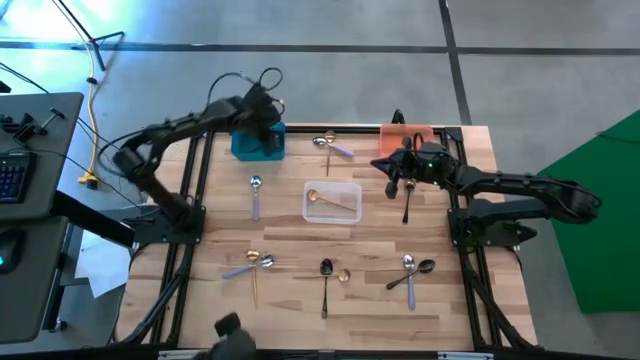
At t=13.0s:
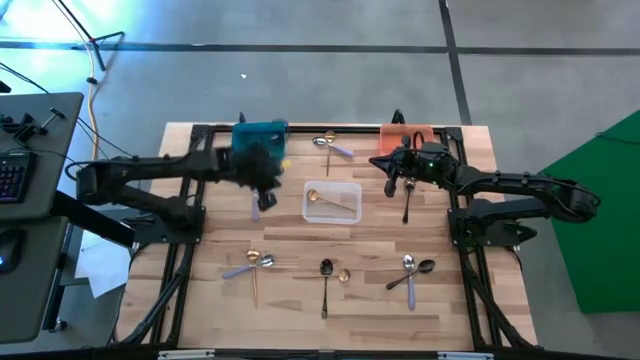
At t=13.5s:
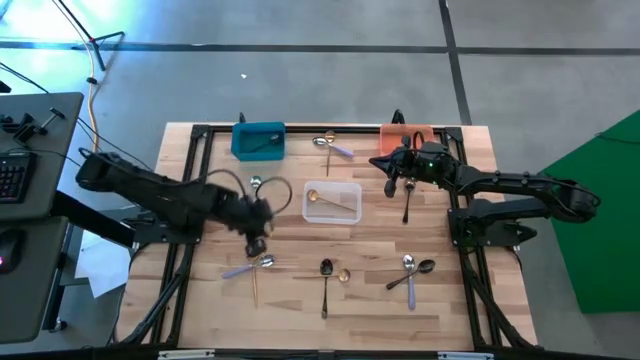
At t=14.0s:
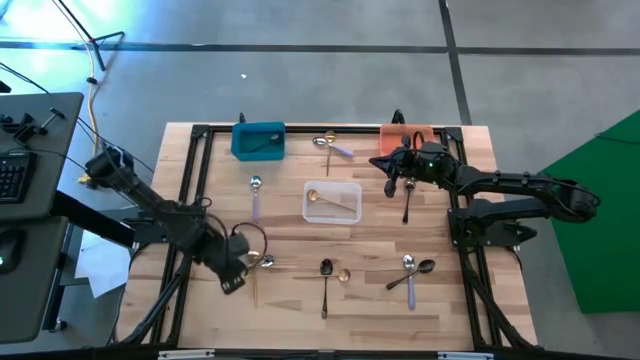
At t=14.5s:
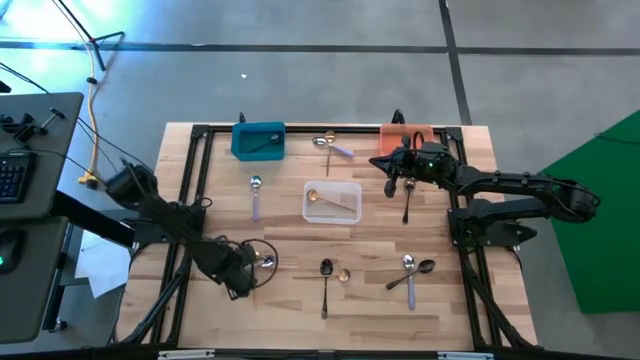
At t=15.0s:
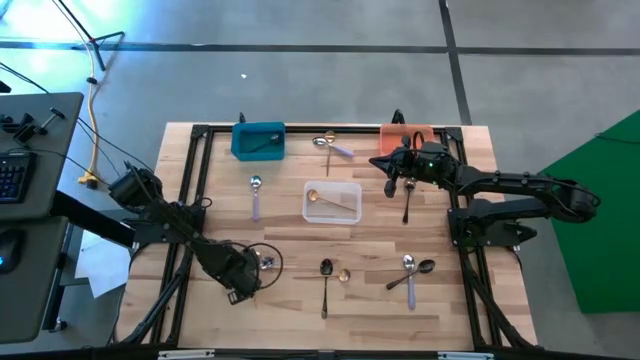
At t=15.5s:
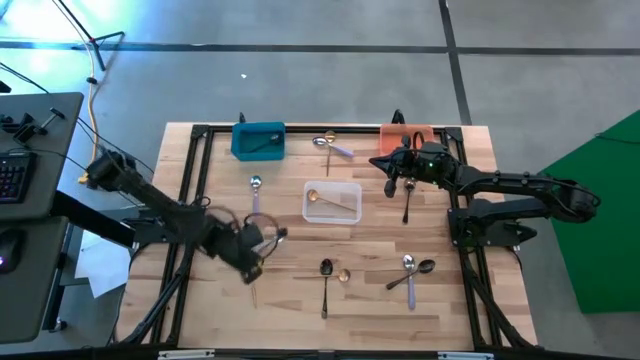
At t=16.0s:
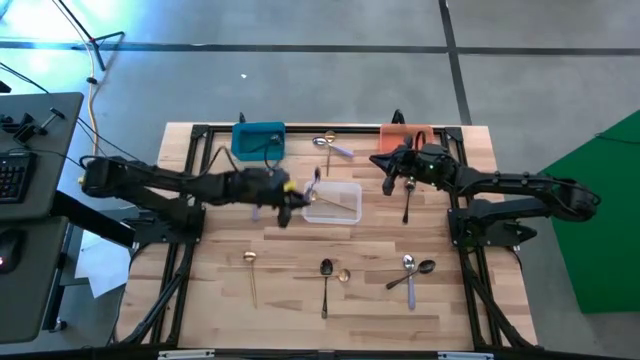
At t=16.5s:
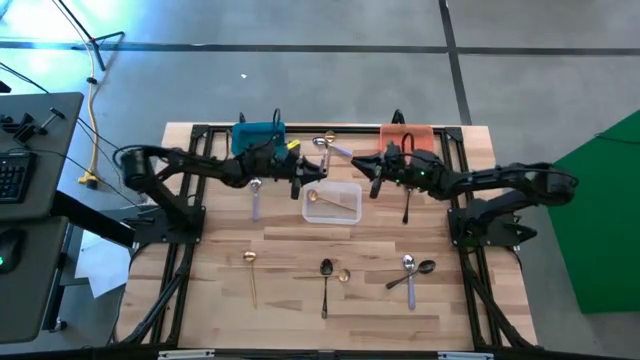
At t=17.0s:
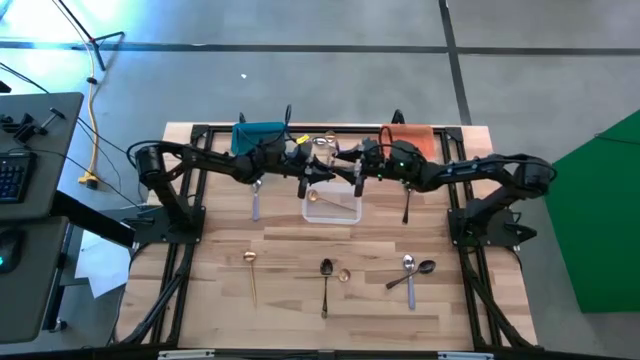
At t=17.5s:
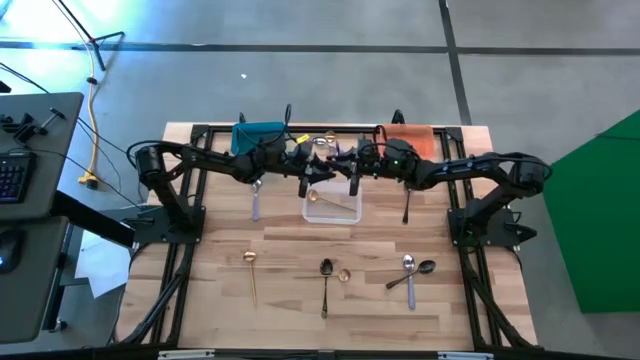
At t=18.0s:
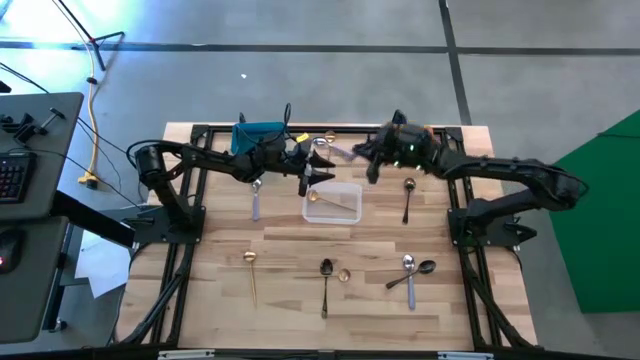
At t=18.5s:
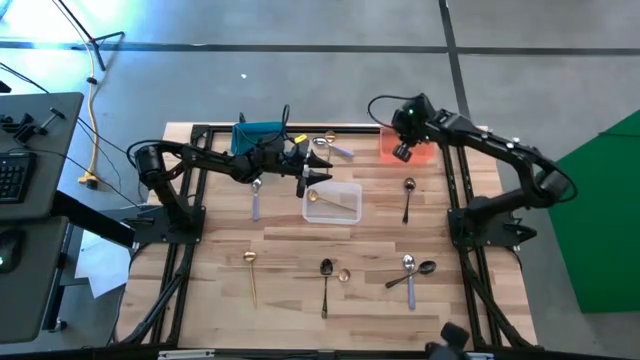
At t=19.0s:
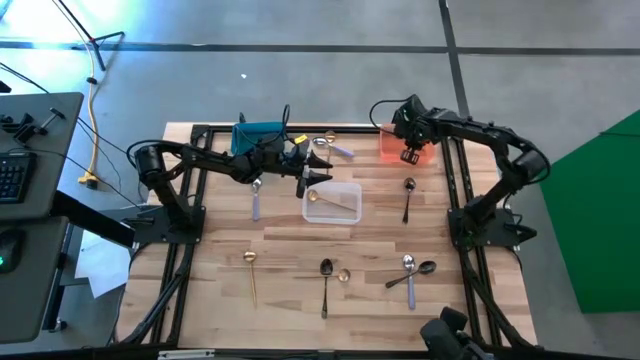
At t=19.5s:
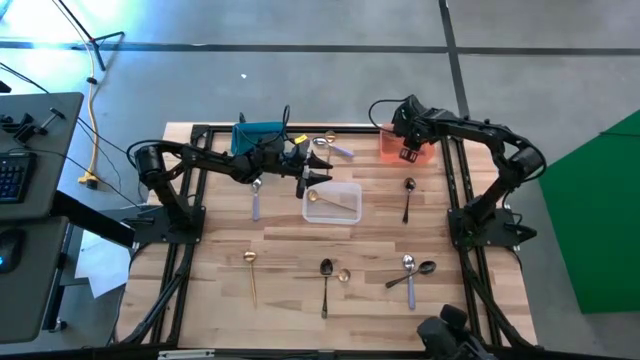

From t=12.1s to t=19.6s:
Task: Sort silverware by color (type)
Put the purple spoon into the orange bin

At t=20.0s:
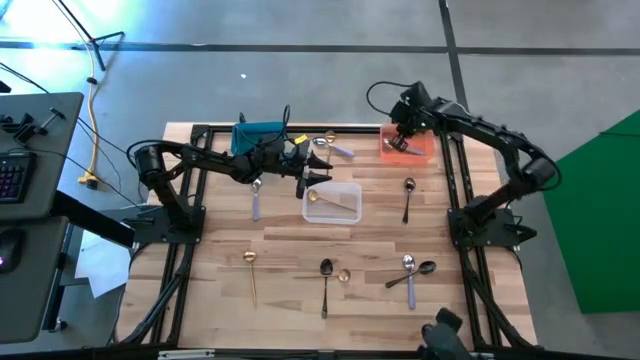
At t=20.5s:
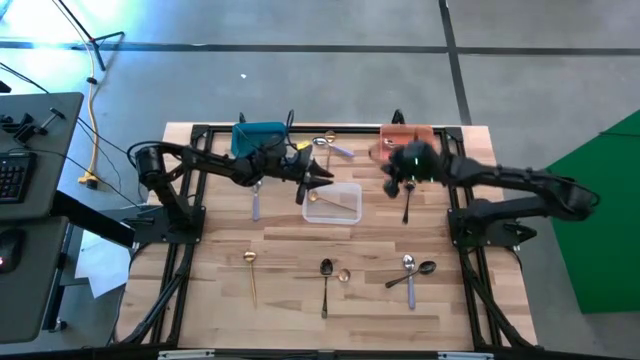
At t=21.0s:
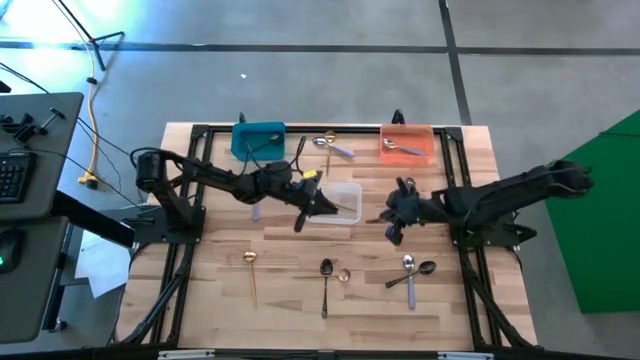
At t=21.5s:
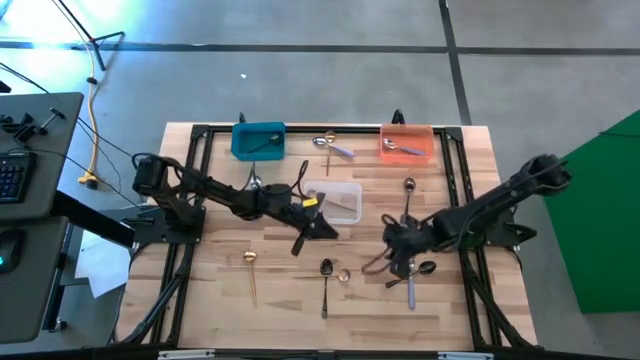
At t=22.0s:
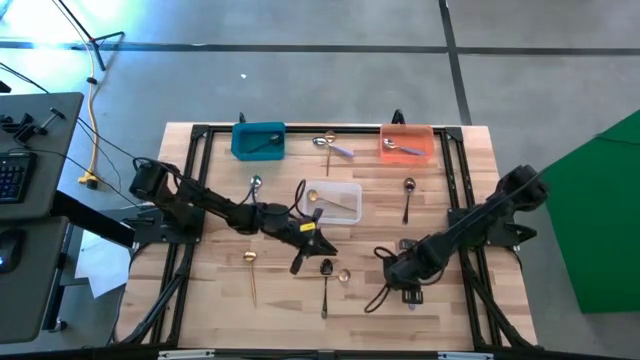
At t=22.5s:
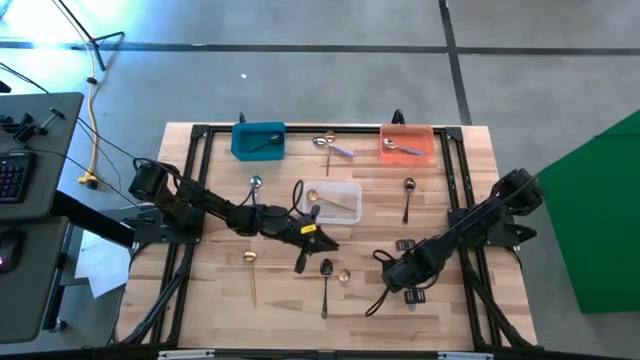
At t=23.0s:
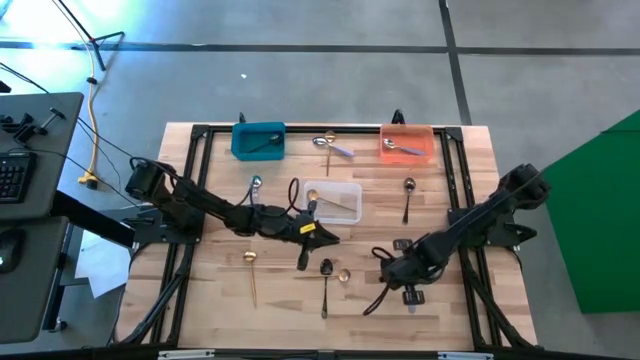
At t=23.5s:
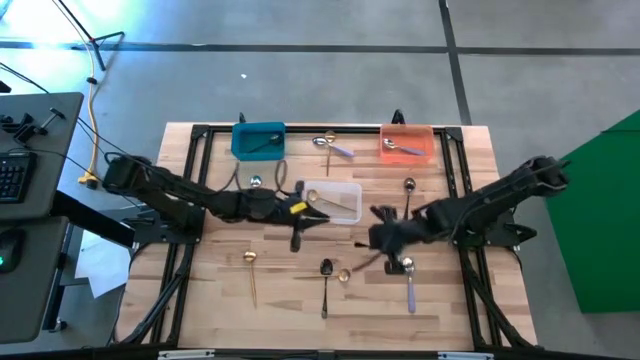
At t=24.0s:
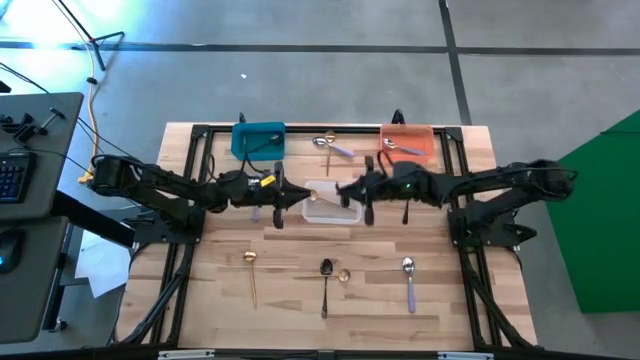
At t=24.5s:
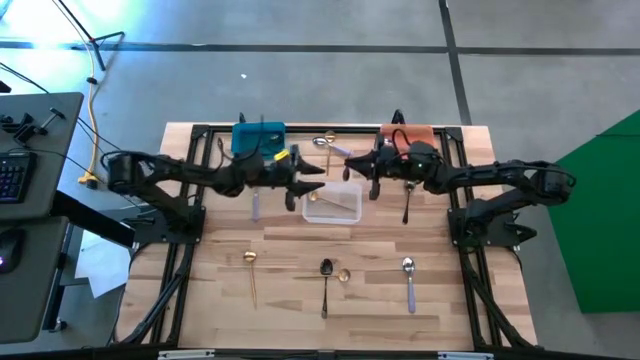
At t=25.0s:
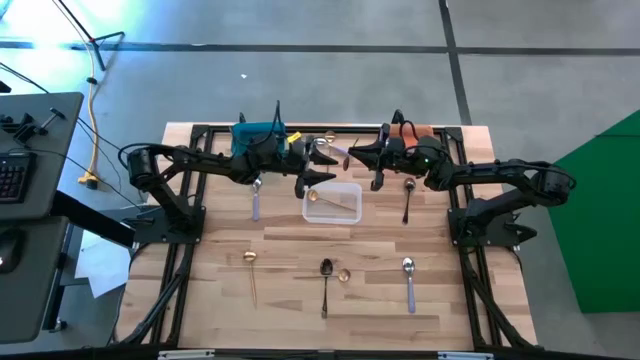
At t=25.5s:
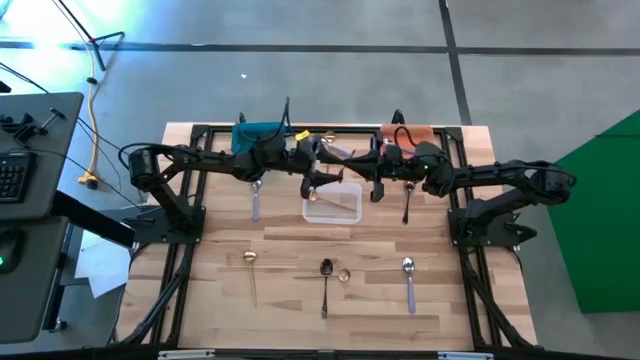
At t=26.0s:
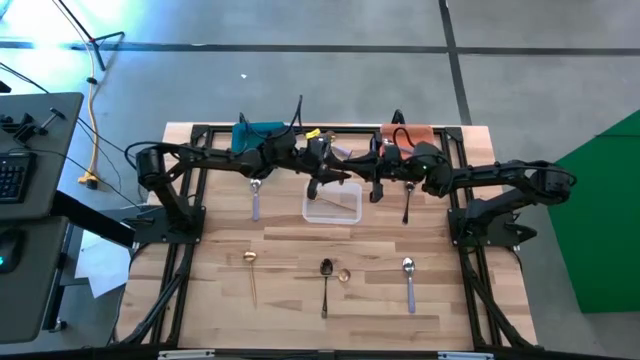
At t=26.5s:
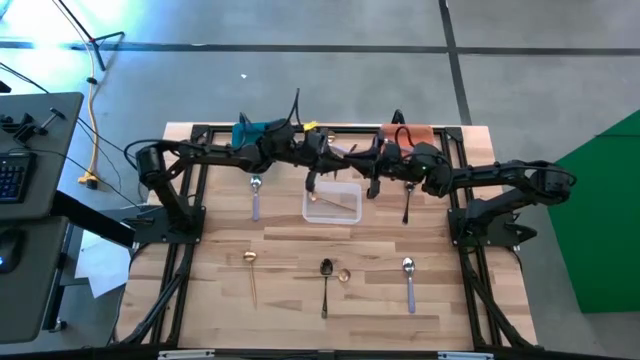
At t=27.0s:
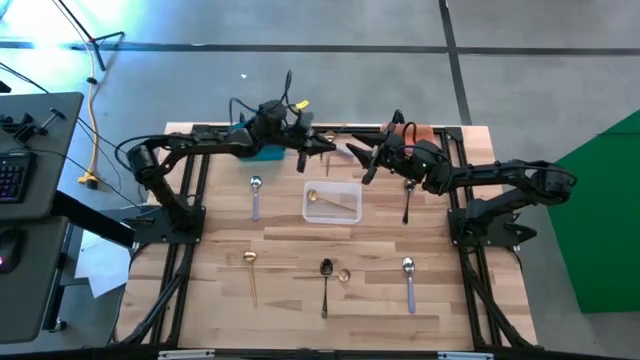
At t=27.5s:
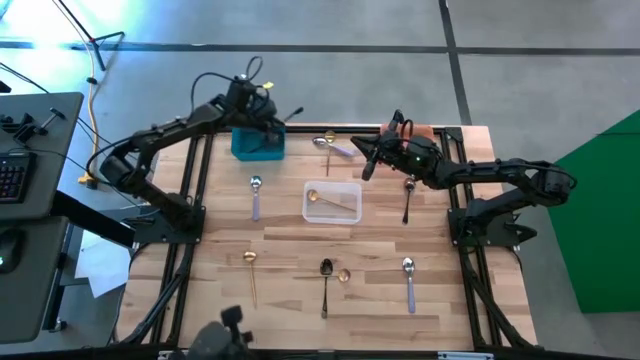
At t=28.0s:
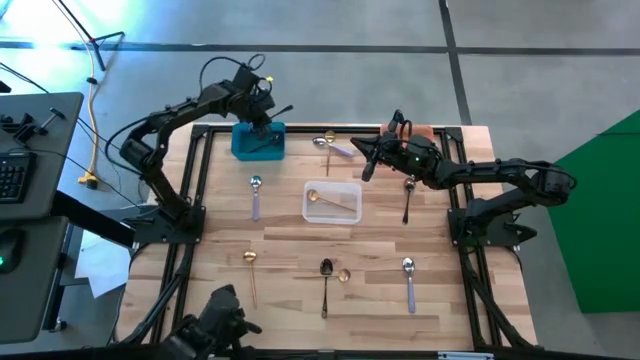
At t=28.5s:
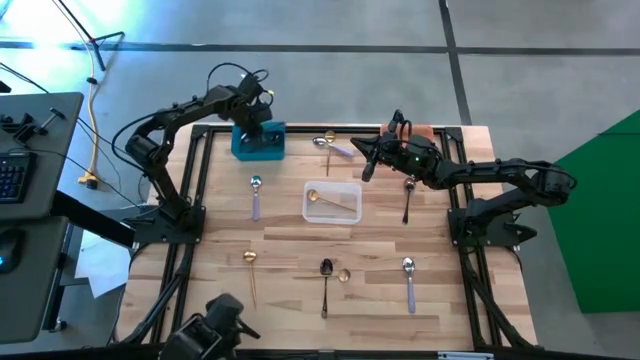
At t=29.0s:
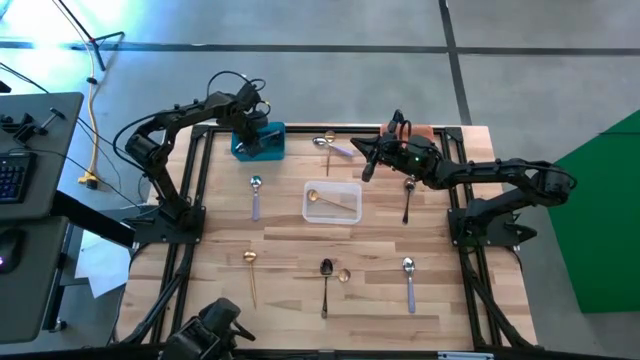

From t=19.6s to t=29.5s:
Put the black spoon into the blue bin

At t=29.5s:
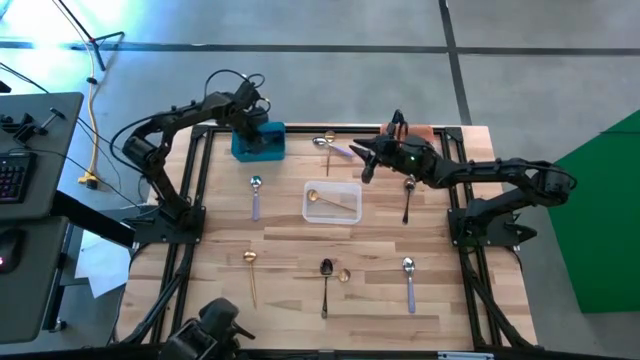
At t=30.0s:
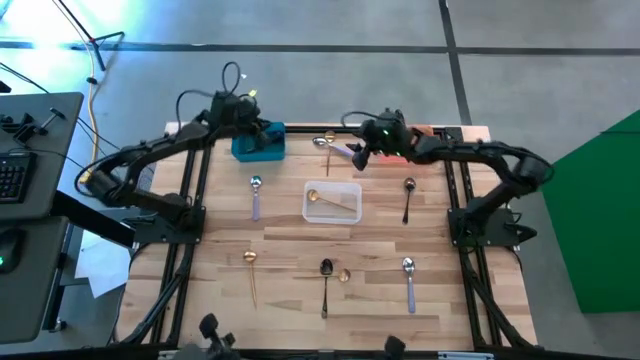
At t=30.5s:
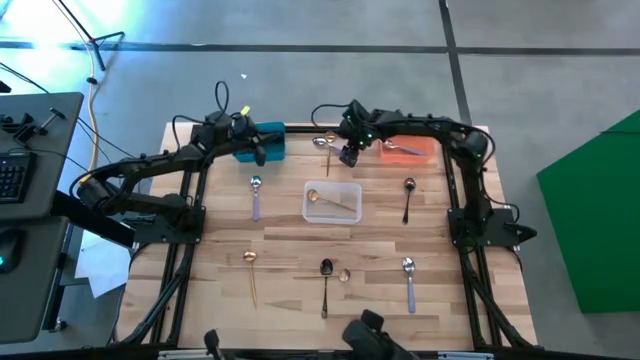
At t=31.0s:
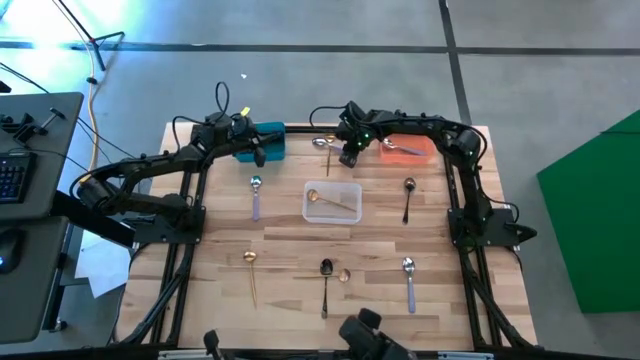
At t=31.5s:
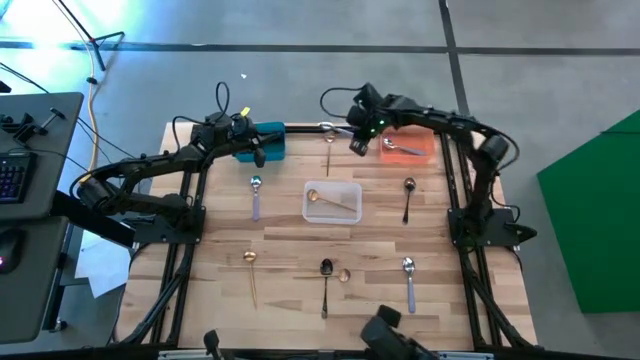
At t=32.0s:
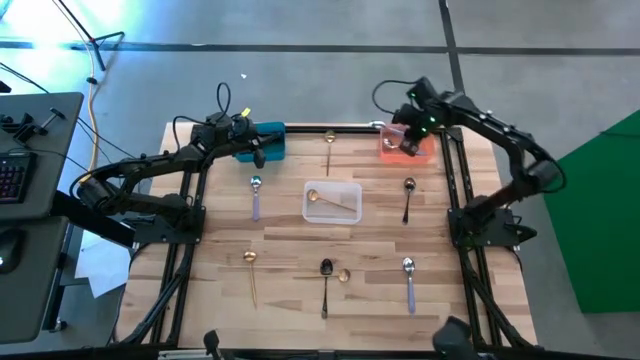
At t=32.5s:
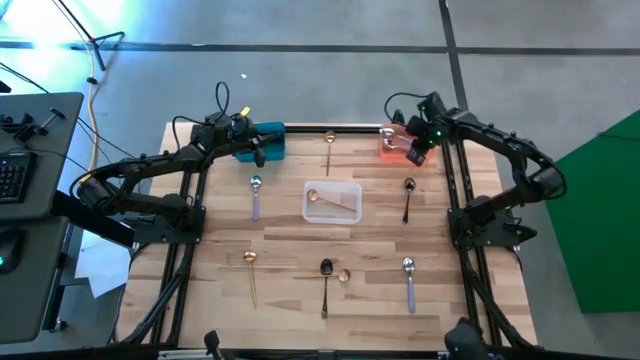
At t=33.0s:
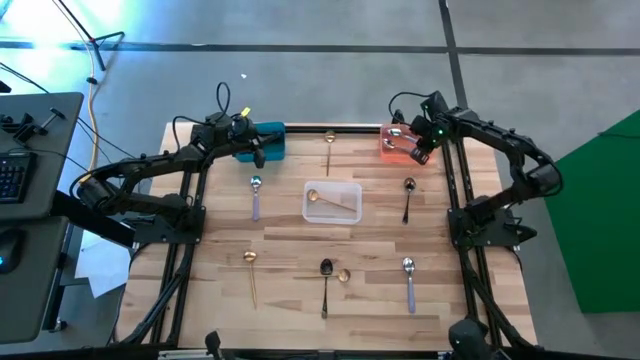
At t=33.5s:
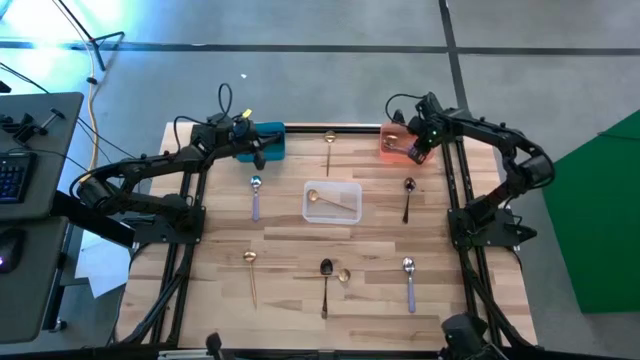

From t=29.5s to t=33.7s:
Put the purple spoon into the orange bin
